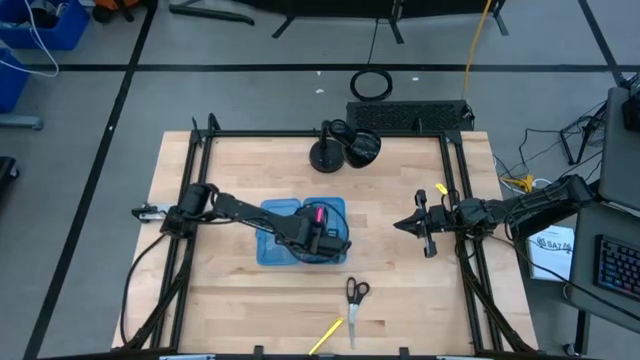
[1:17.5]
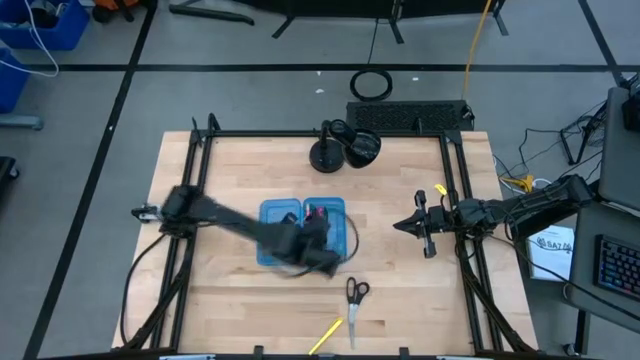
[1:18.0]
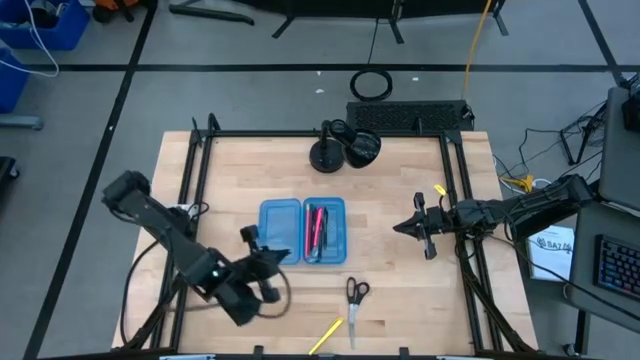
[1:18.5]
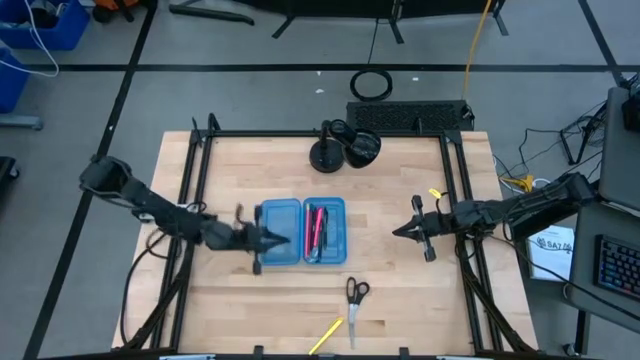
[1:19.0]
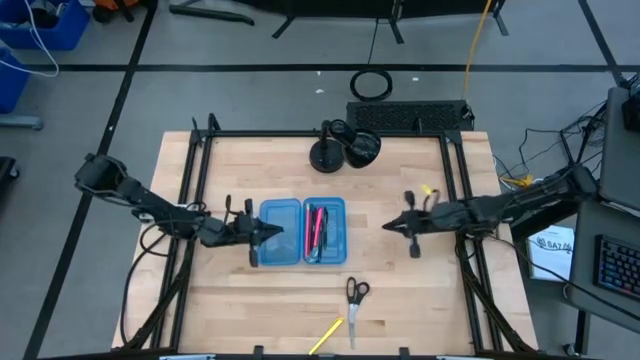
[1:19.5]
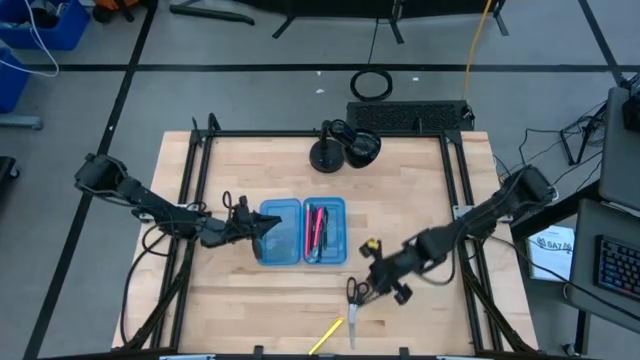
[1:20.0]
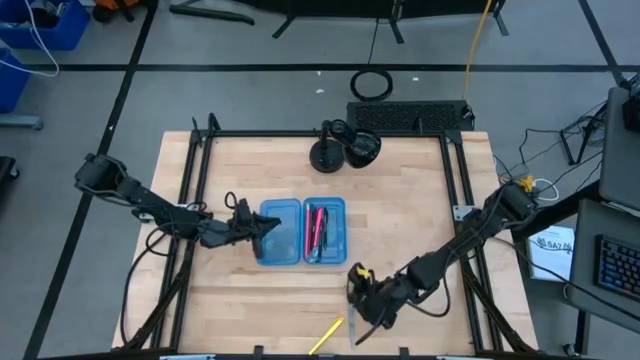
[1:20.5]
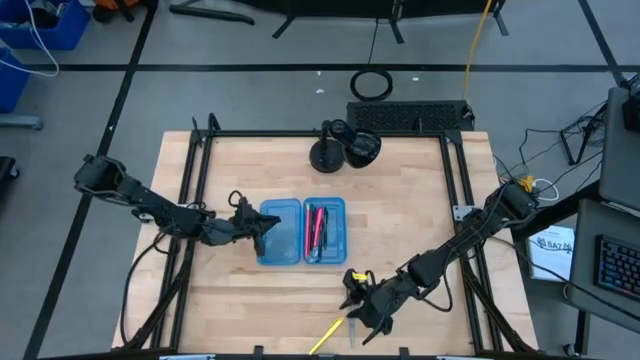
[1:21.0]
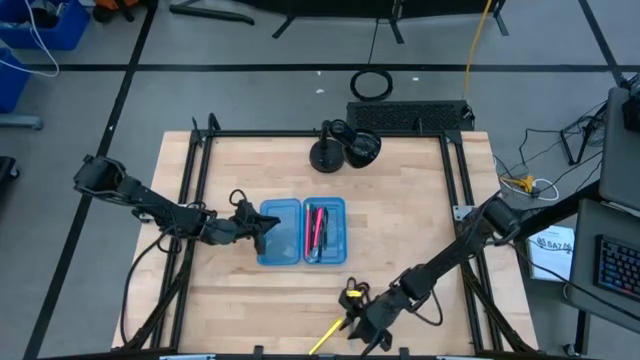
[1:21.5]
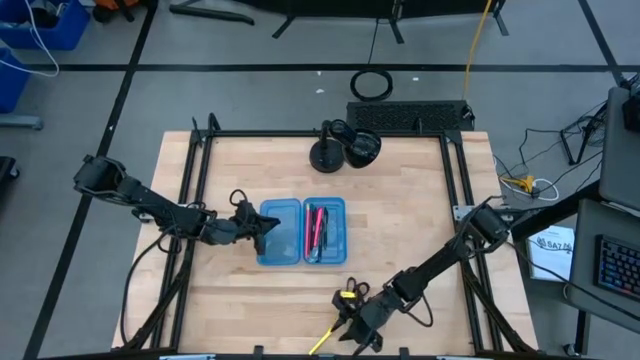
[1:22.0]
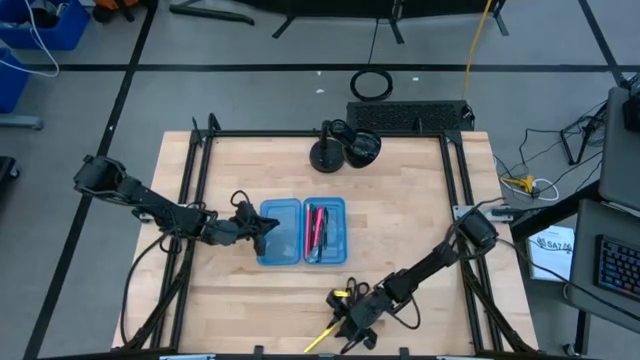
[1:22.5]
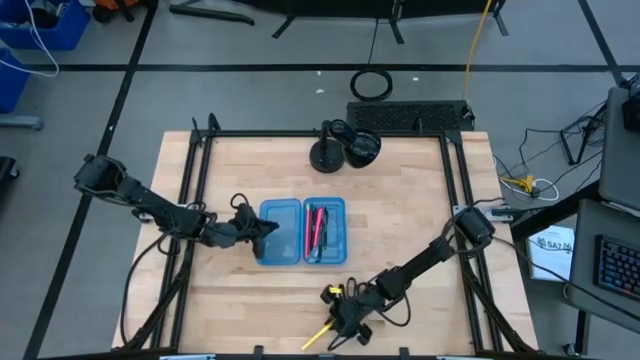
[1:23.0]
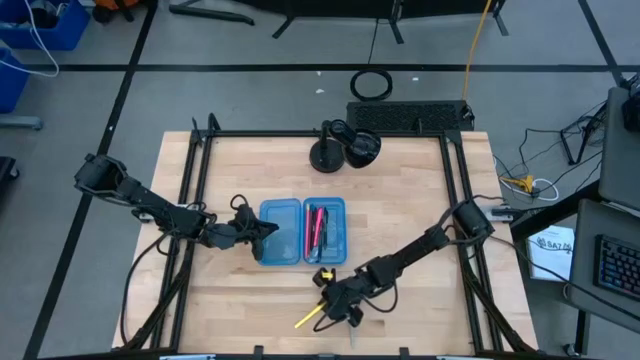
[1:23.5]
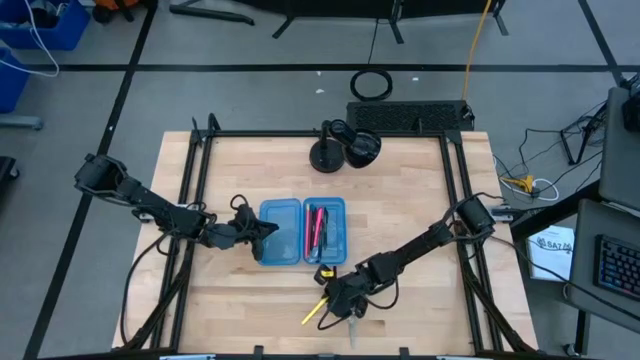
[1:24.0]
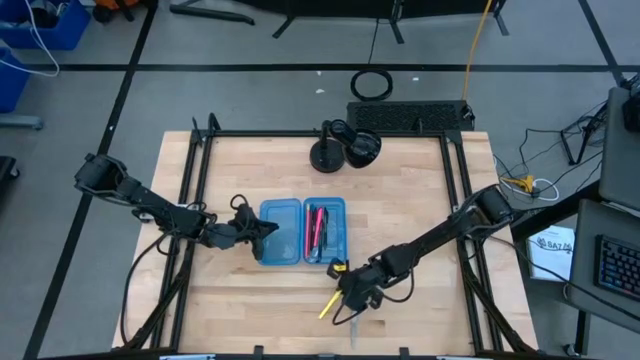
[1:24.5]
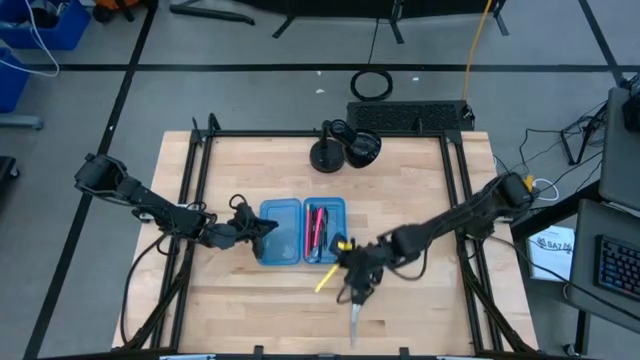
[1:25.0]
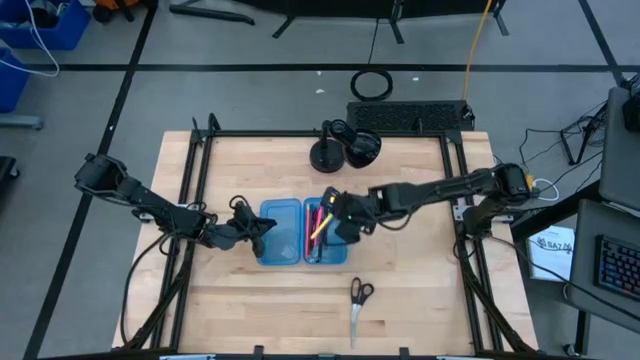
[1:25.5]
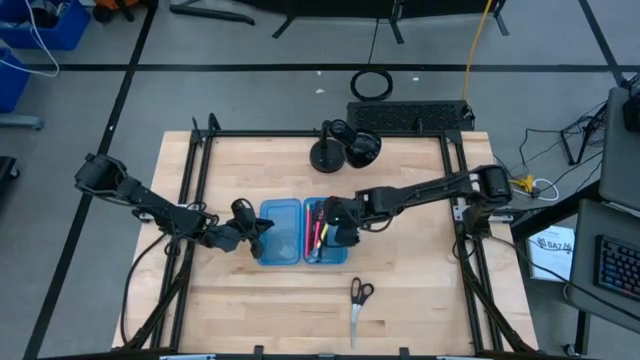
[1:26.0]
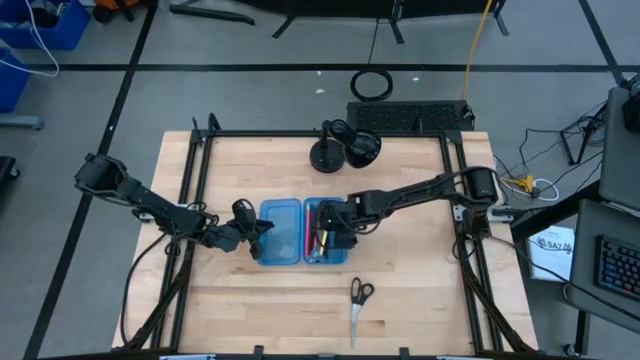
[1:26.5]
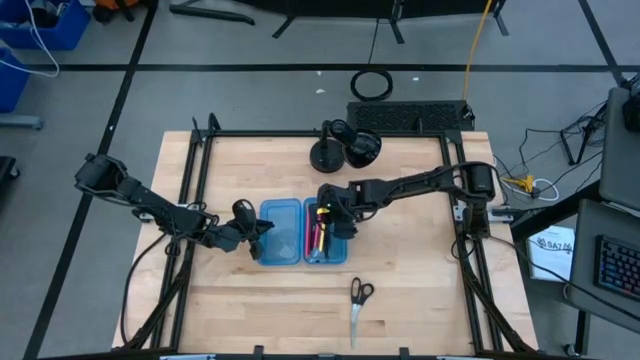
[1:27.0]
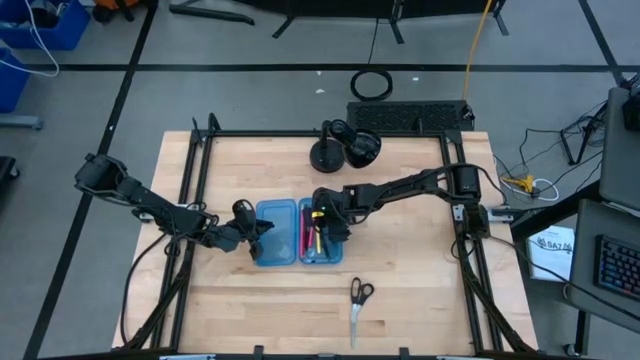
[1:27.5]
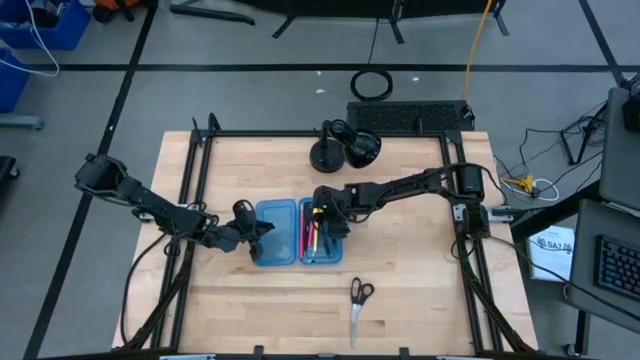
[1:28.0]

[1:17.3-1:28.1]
Task: Pick & place school supplies into a supply box
Put the yellow pen into the blue supply box

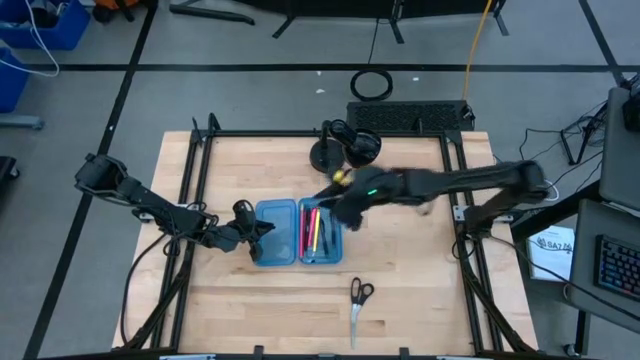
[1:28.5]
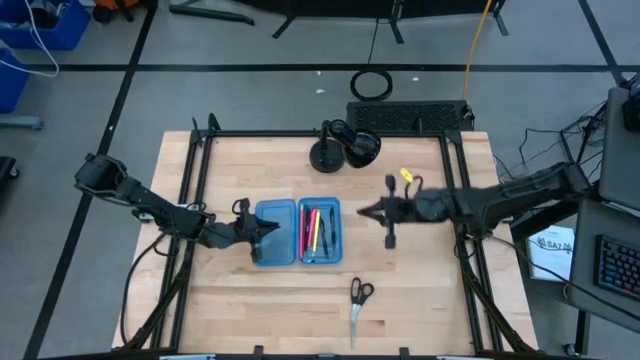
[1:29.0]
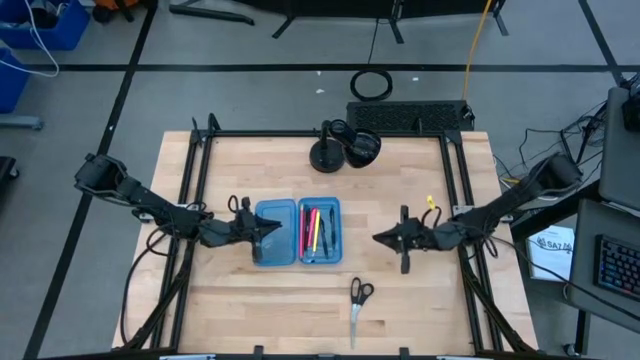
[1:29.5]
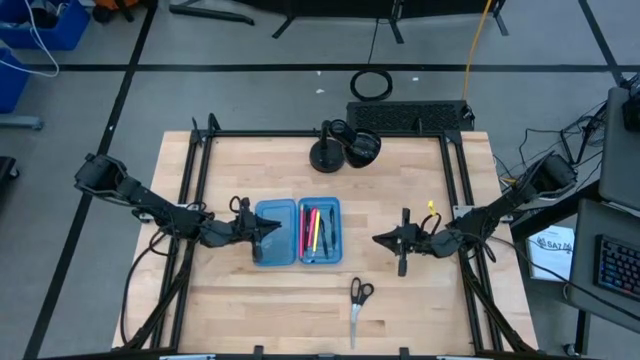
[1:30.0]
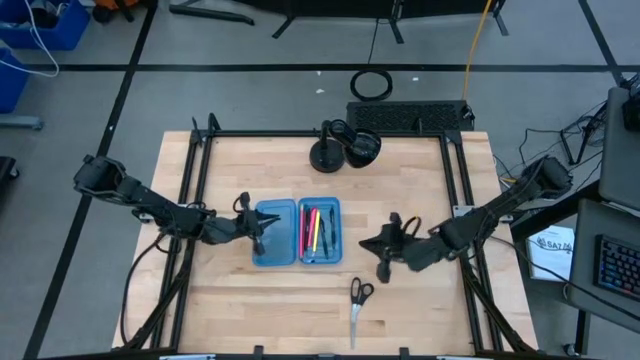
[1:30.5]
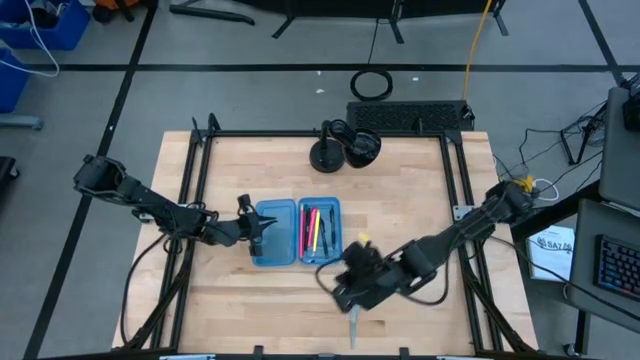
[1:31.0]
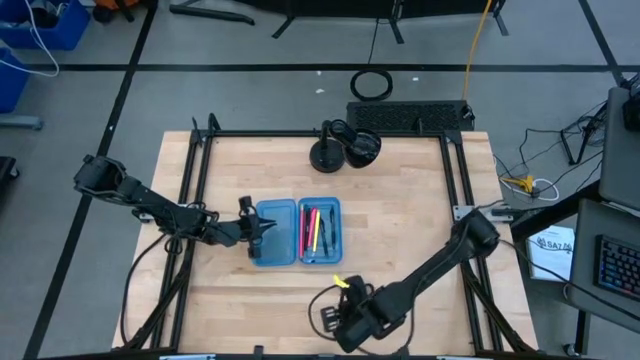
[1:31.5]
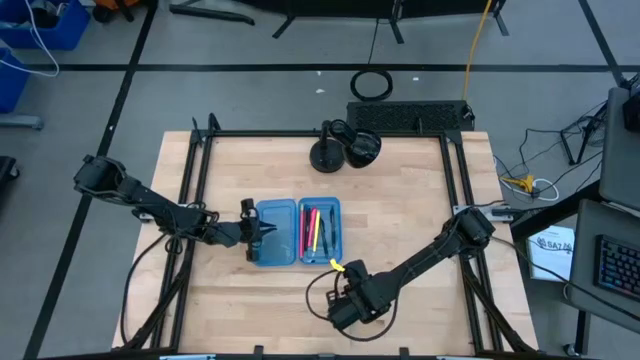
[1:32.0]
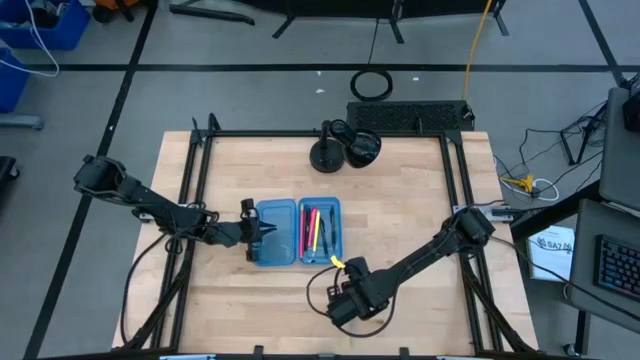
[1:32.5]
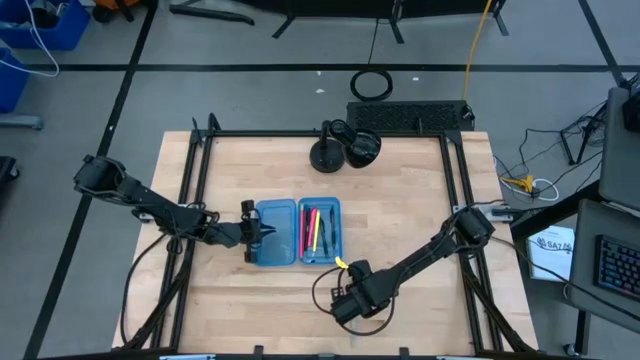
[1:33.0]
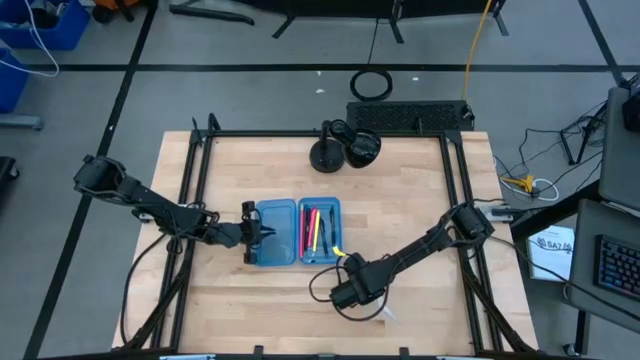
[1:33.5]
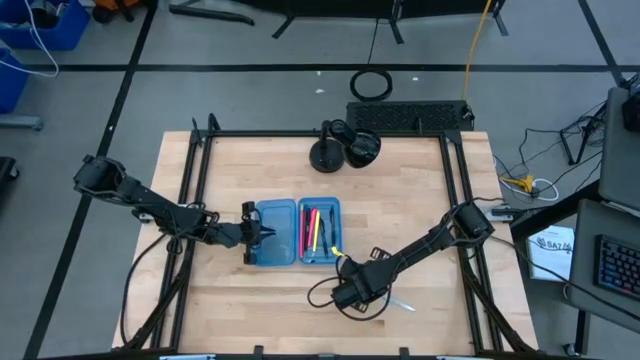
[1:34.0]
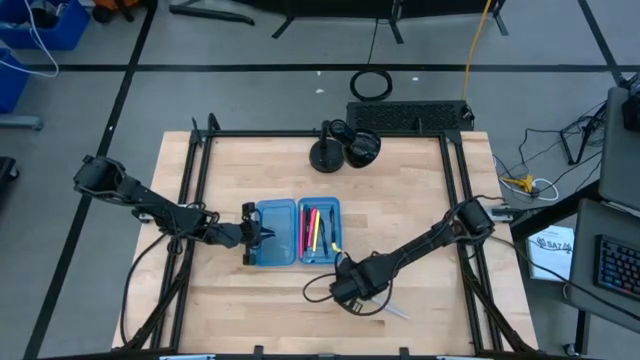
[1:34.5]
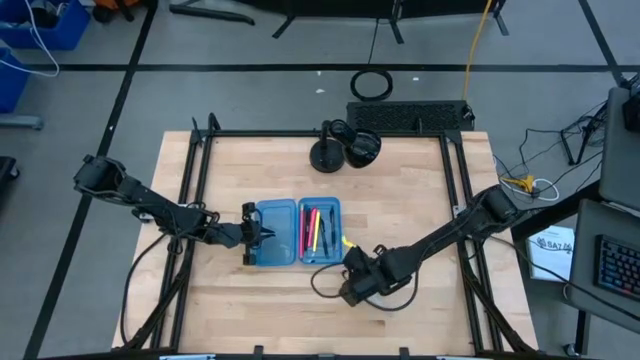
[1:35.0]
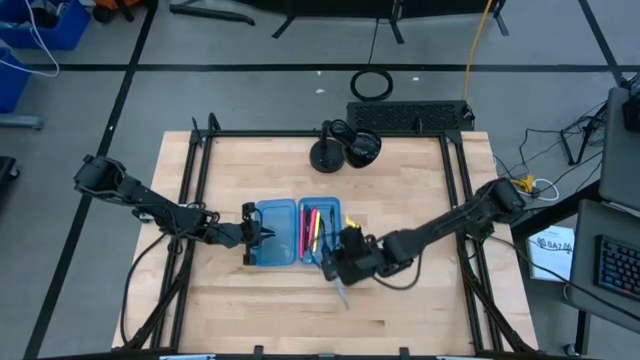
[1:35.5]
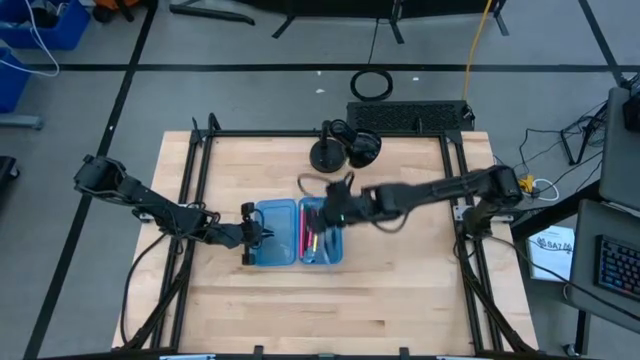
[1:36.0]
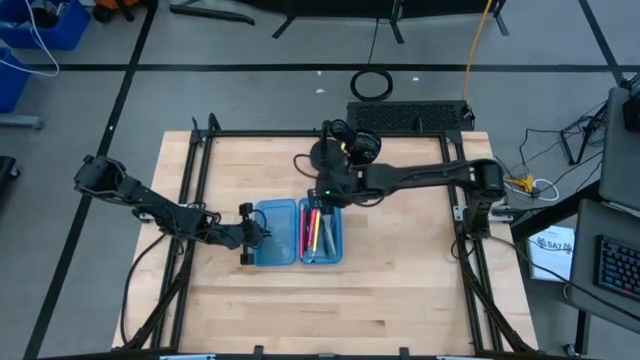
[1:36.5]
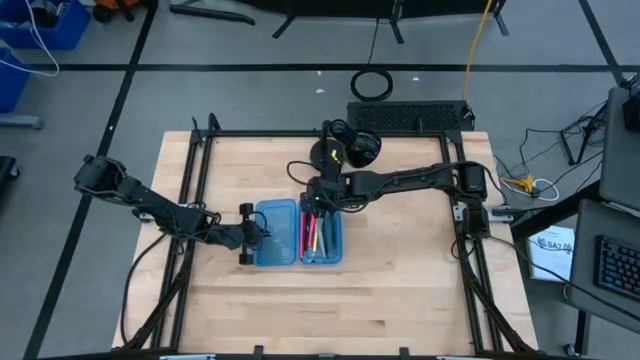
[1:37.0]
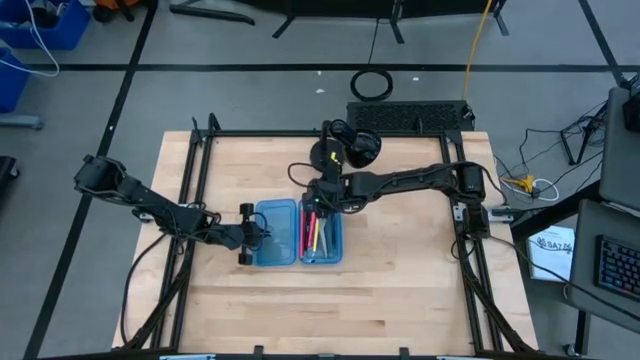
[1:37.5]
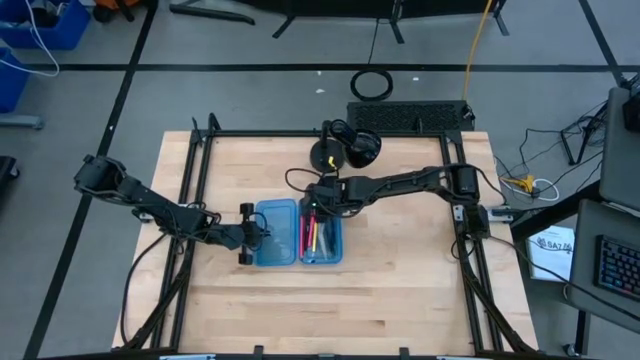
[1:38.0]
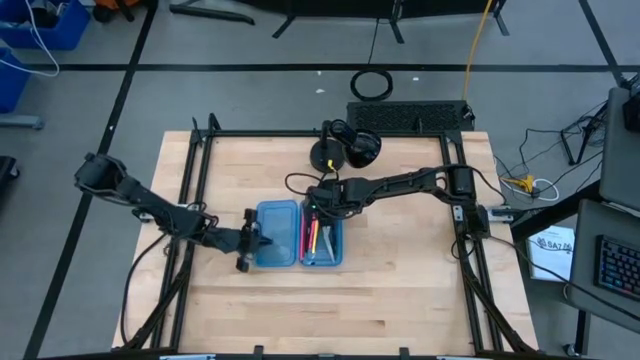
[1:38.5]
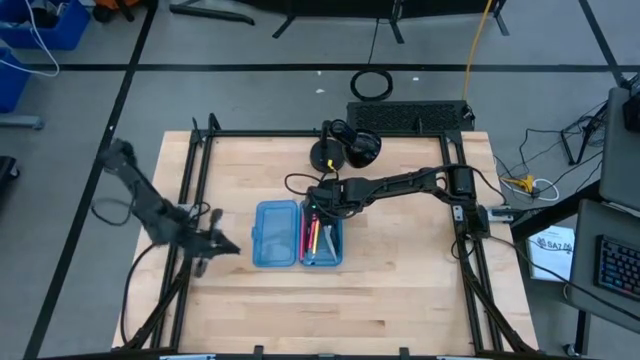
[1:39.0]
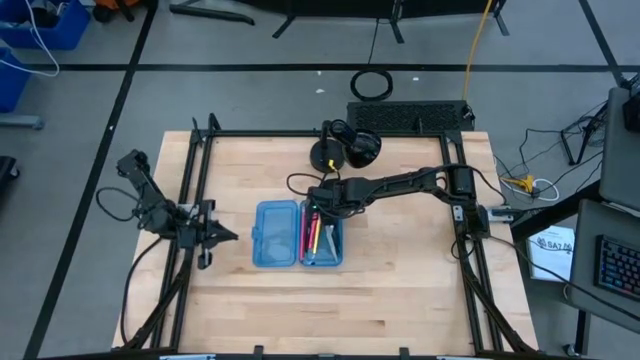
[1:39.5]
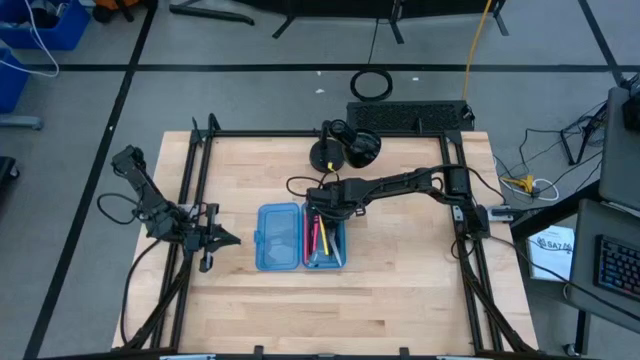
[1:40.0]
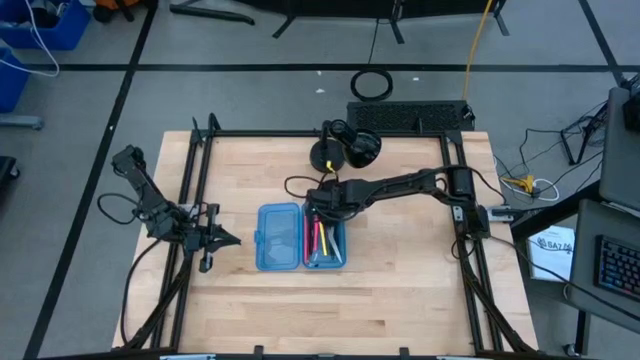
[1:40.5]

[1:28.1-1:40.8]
Put the black scissors into the blue supply box
